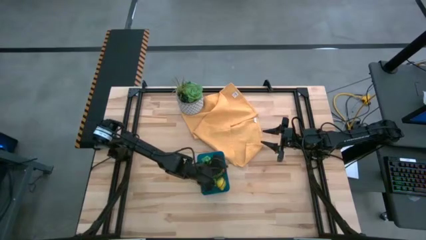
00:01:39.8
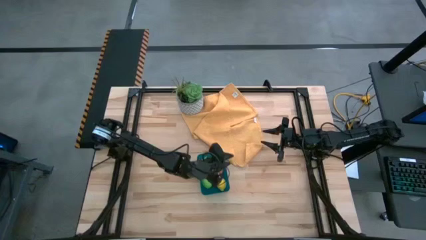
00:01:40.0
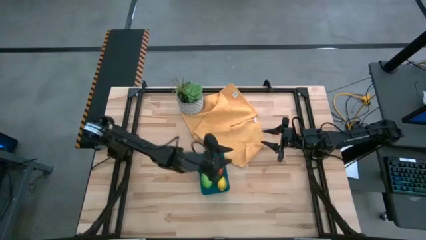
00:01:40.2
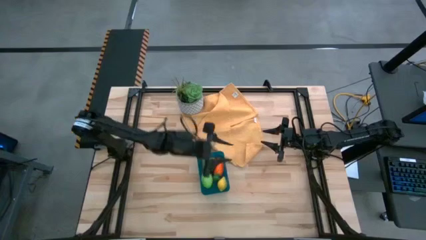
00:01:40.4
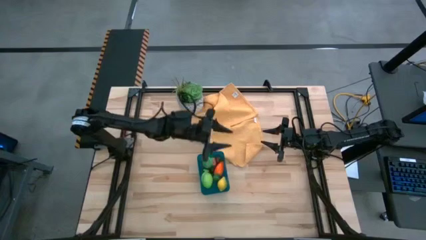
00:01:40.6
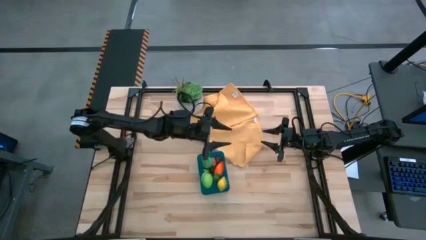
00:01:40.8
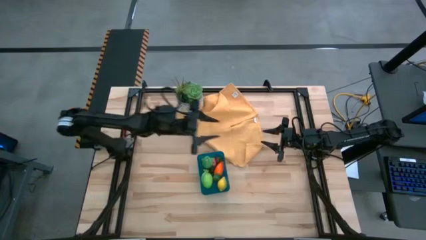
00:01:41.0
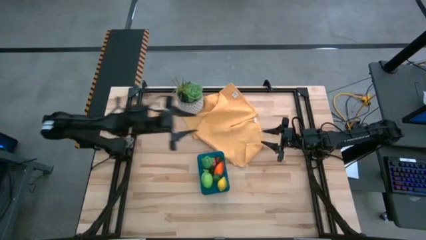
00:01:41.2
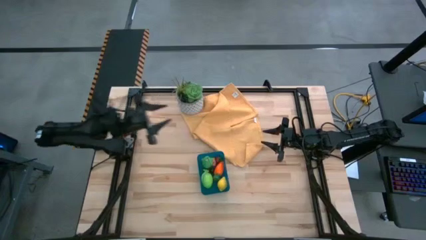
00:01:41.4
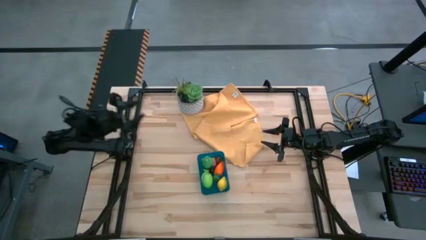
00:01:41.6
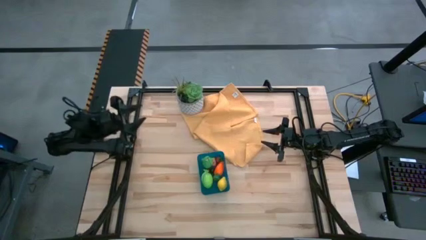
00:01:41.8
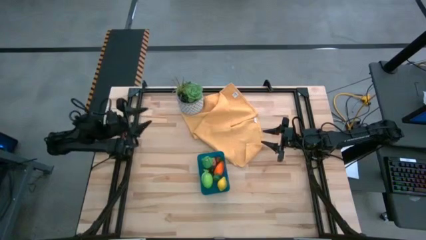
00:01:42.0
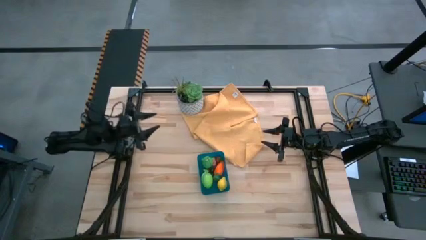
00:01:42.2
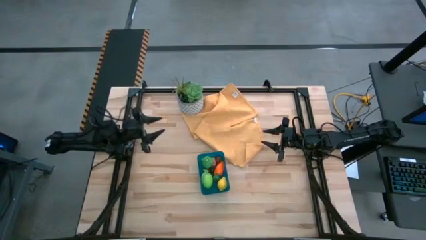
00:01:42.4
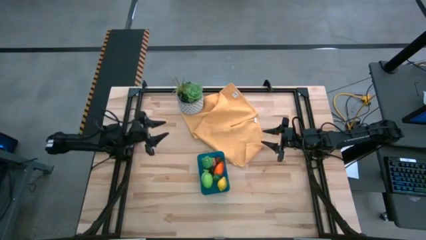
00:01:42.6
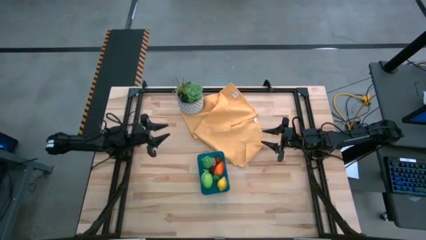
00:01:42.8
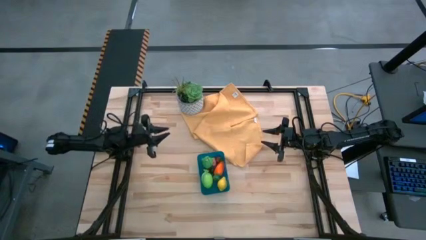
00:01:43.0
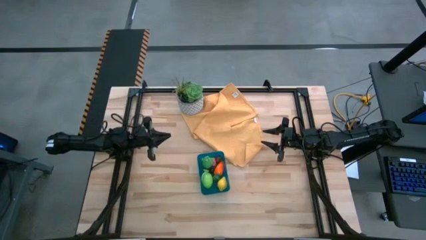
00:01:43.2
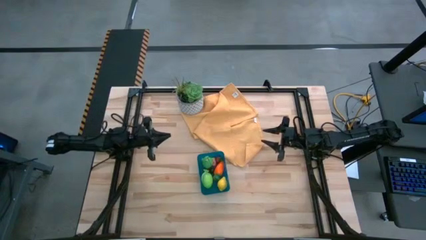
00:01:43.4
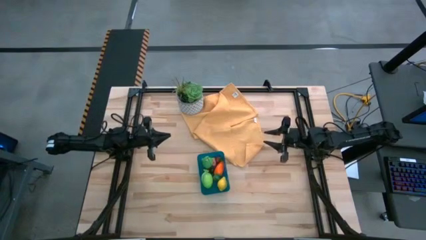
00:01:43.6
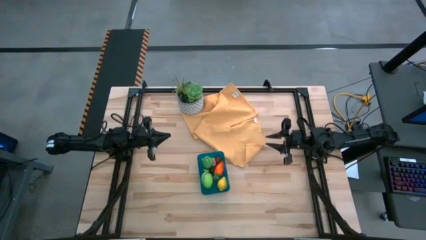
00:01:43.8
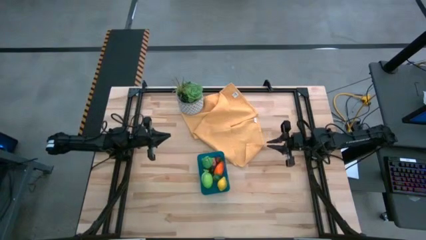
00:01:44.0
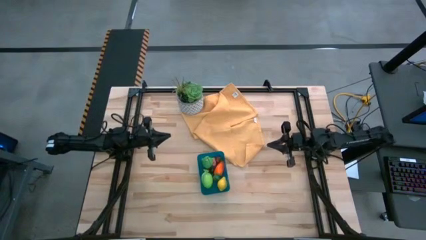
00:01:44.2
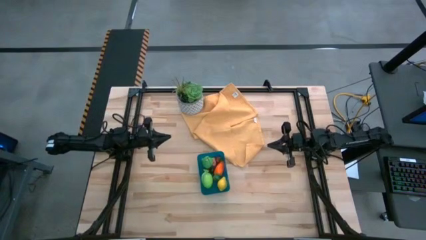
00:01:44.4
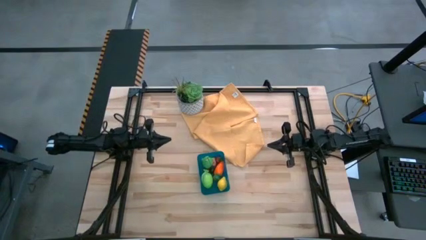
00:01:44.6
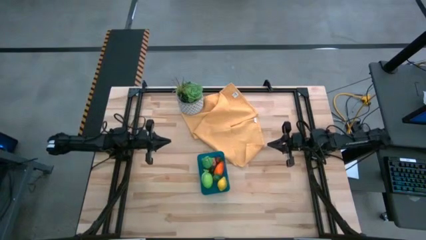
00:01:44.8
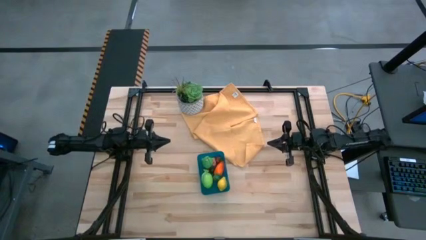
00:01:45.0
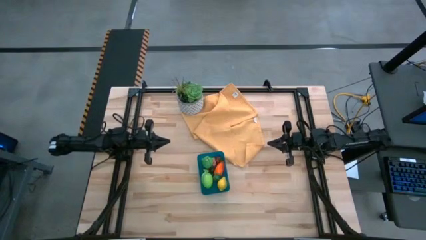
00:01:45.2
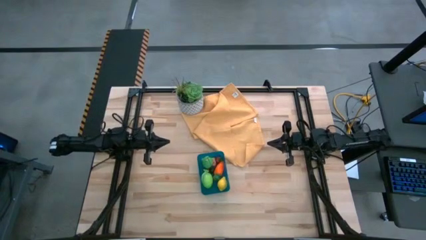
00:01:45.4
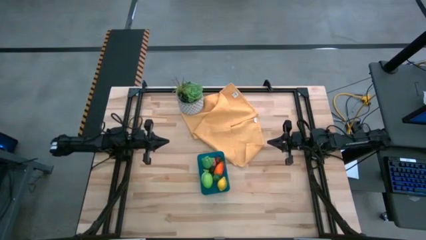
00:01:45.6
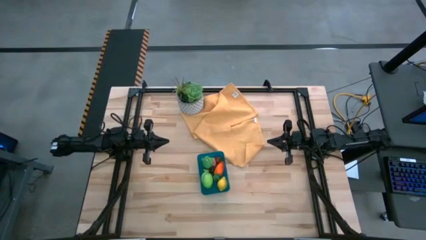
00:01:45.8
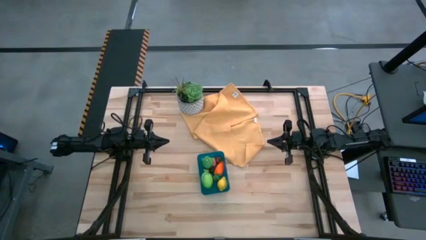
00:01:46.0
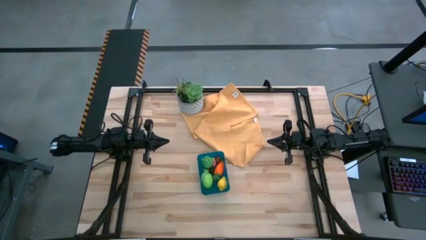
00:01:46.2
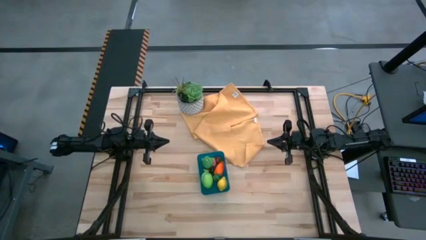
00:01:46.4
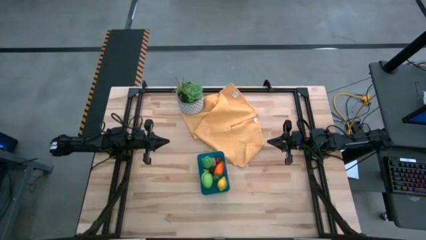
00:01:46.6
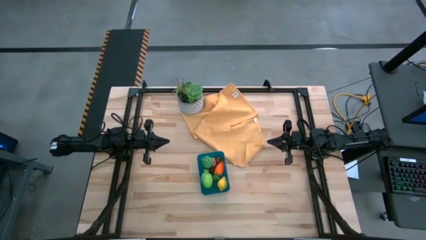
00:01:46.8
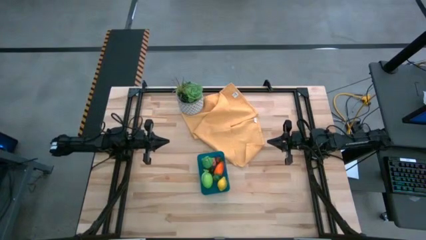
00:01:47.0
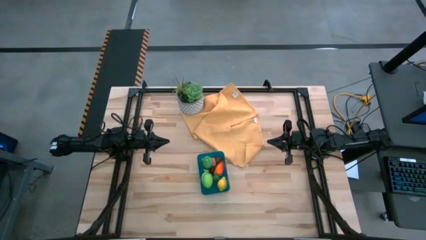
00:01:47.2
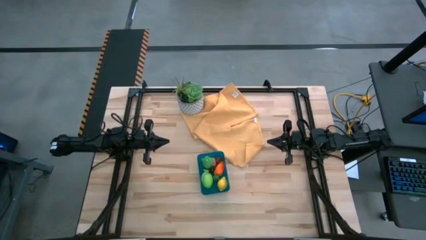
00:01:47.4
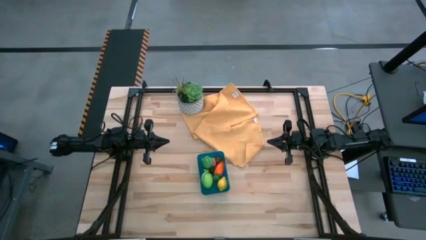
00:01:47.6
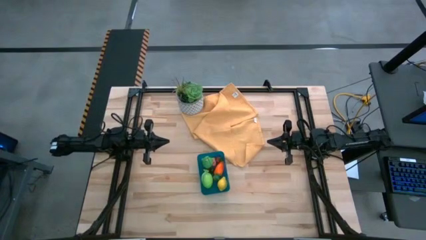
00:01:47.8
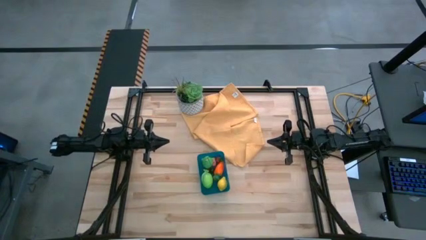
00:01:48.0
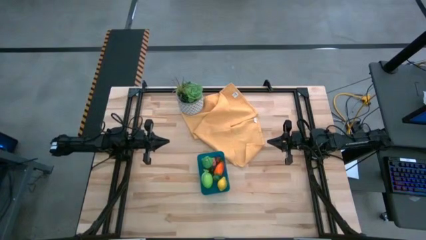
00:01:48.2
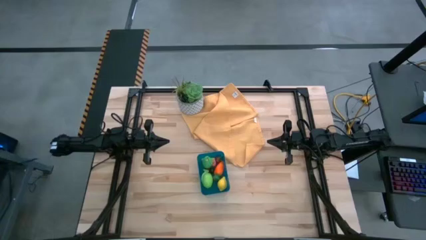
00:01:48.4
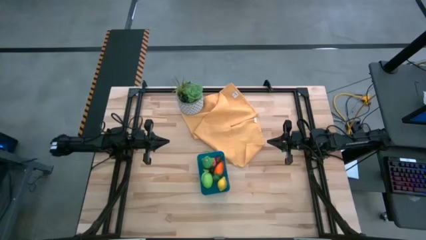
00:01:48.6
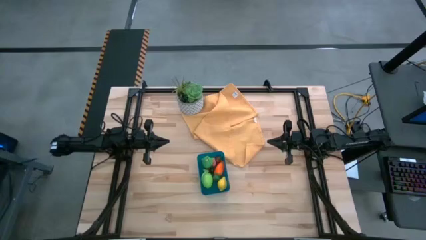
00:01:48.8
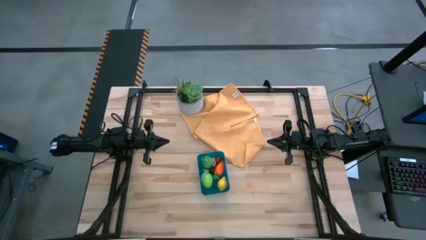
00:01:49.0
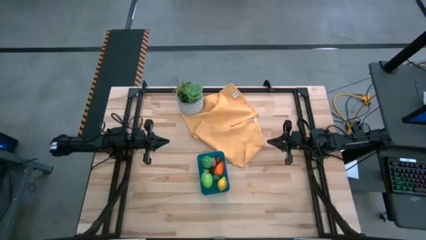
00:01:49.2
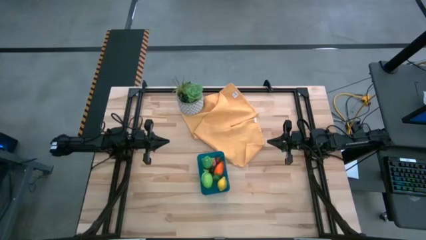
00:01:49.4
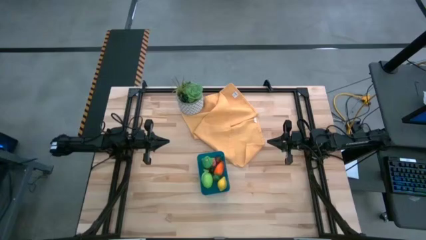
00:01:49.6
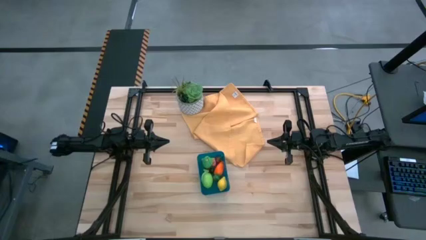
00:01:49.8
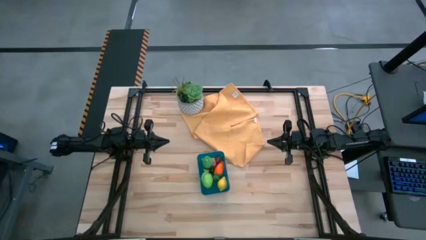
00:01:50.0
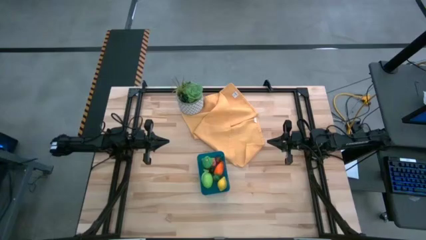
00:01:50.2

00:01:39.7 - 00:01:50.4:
Task: Pick and placing Produce into tupperware
Return to Home Position

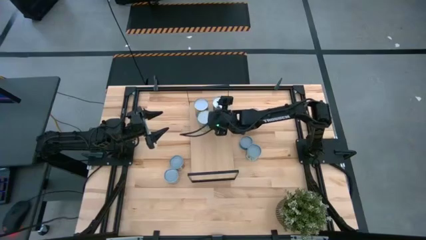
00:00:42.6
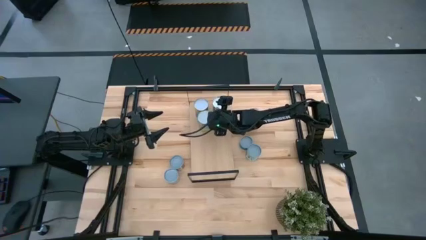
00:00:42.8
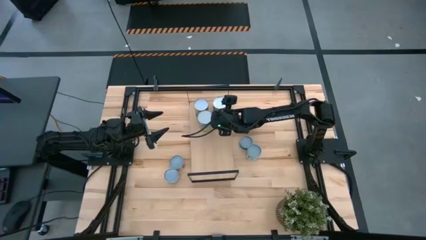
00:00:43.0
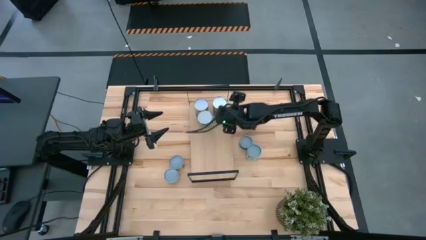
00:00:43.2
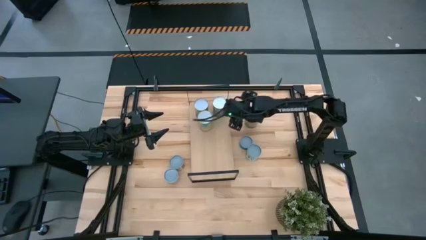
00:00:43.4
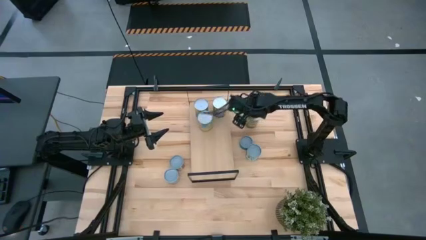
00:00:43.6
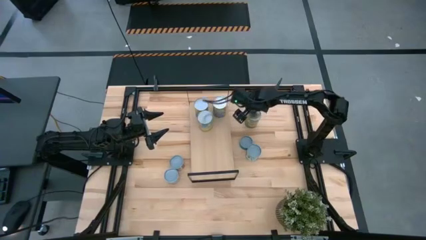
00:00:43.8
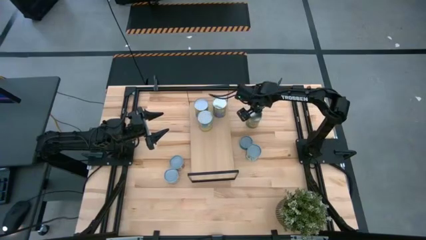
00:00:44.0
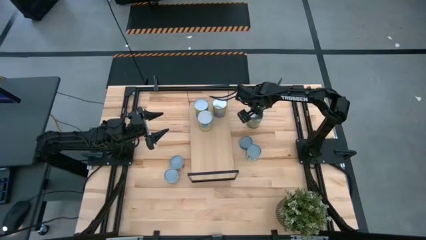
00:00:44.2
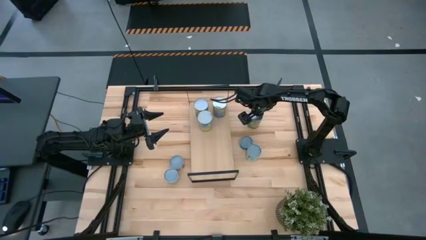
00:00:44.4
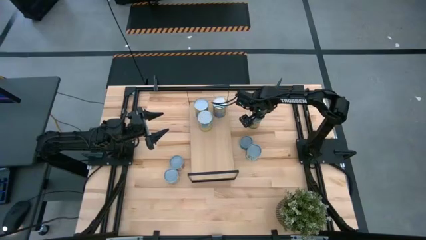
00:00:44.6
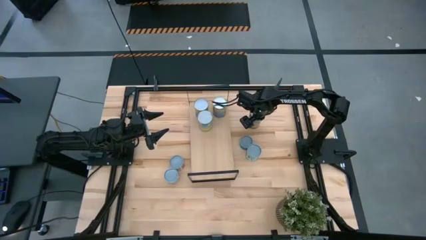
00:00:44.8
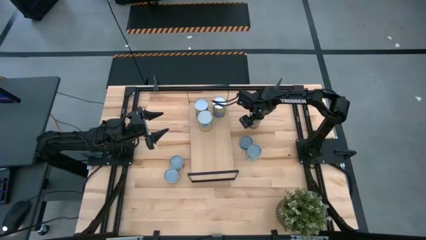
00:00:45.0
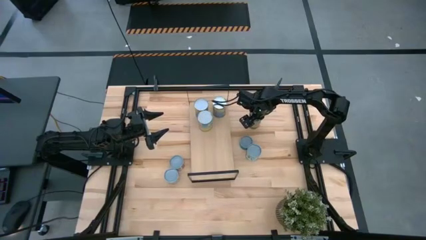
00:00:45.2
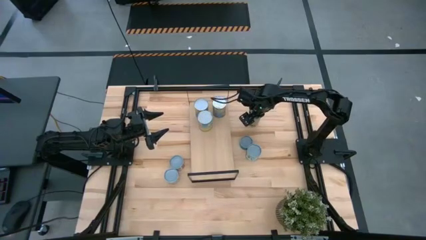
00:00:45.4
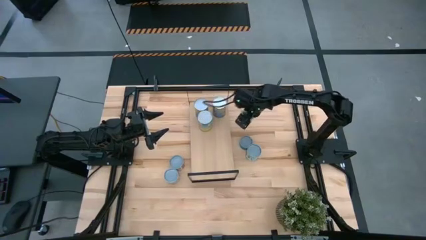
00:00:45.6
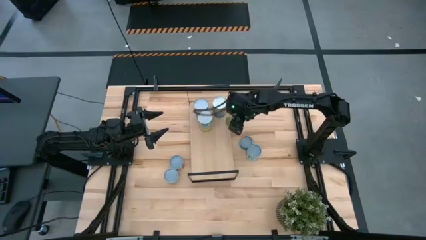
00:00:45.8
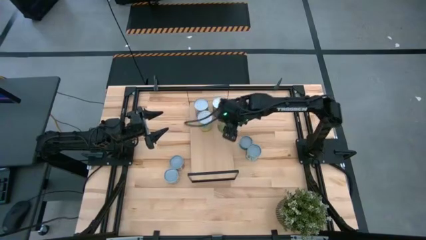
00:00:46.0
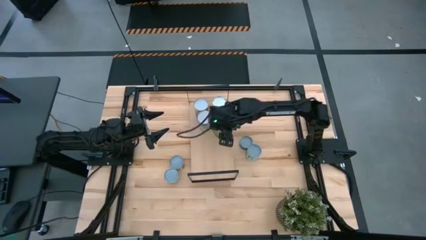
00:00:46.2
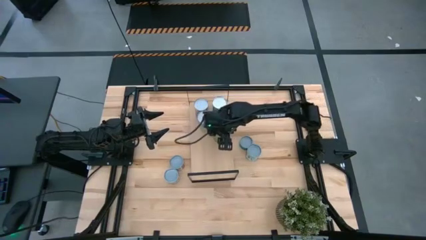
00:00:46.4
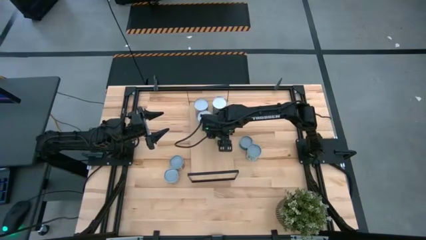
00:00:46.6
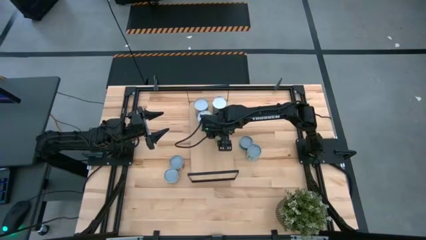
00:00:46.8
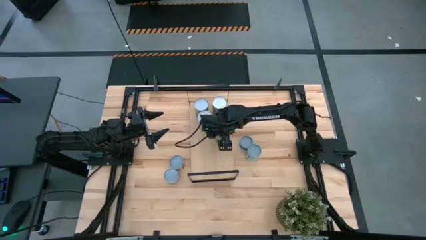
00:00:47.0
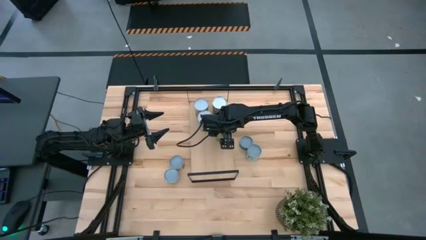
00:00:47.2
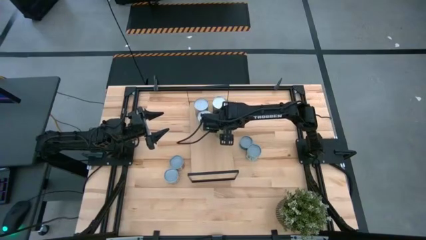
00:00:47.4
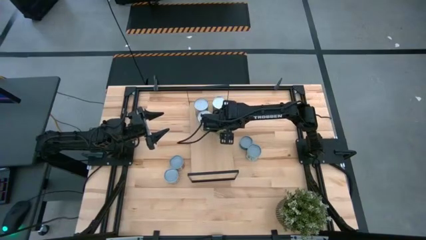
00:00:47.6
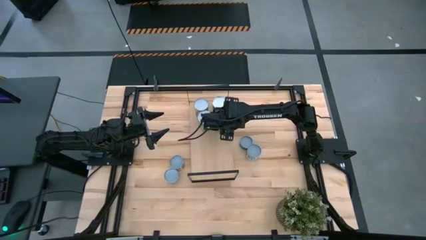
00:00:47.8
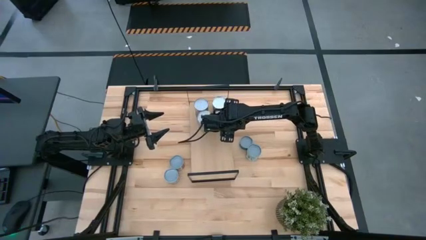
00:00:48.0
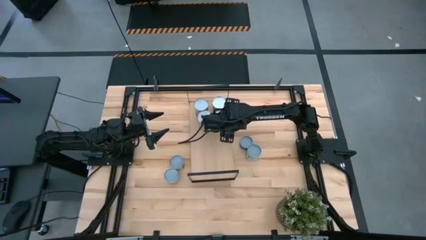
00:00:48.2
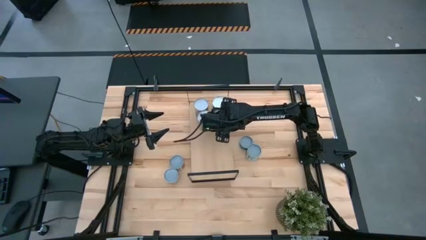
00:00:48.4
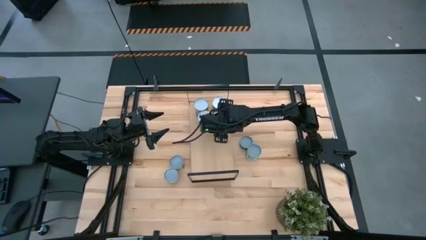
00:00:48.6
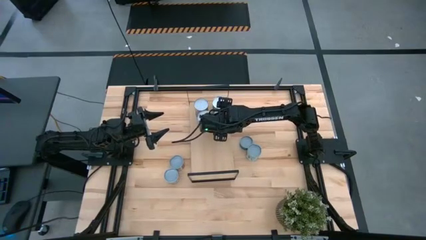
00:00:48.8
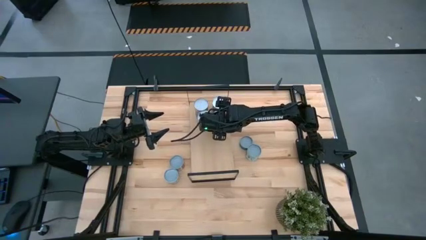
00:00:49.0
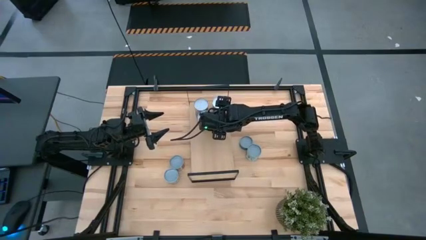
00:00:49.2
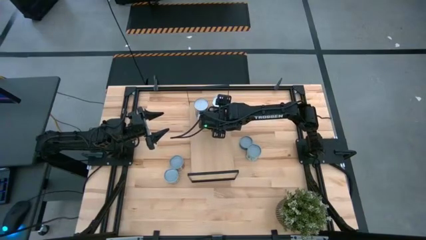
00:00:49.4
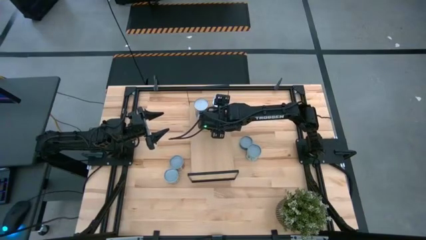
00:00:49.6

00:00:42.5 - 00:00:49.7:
Task: Pick and place cans onto a shelf
Put the canned oranges on the shelf
